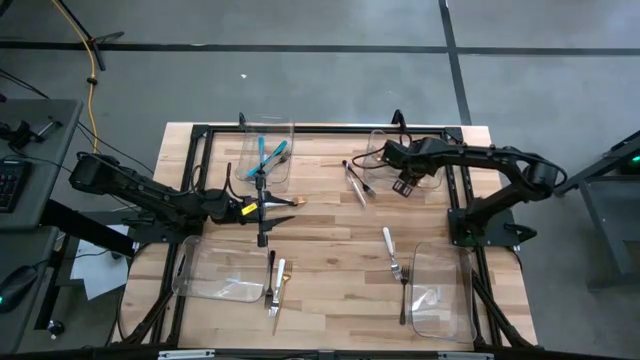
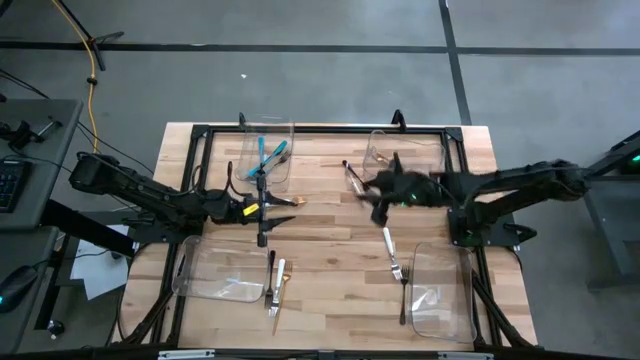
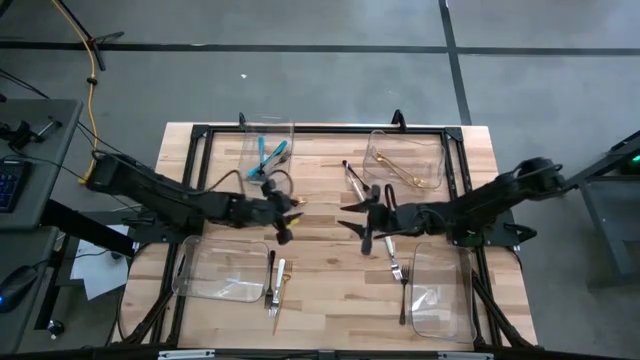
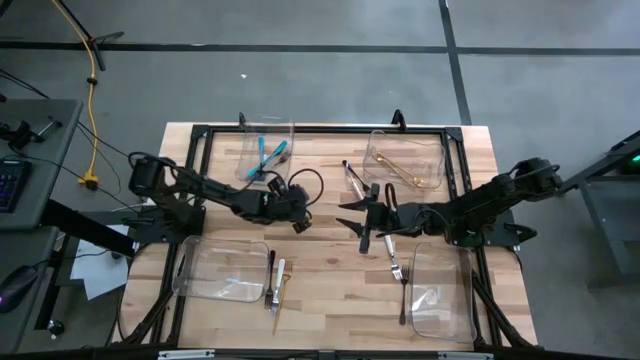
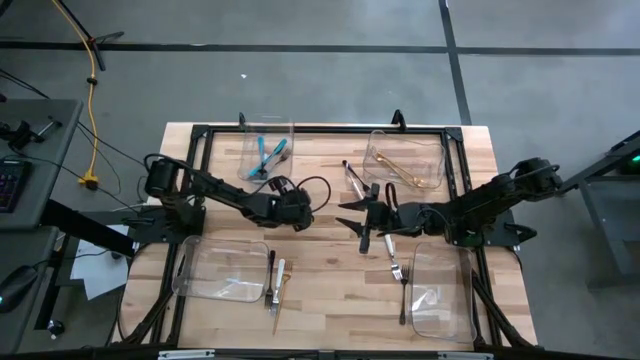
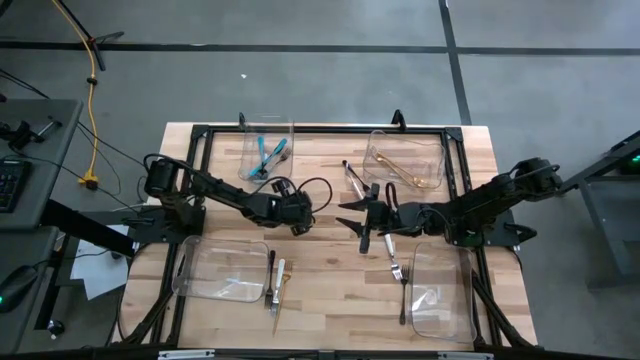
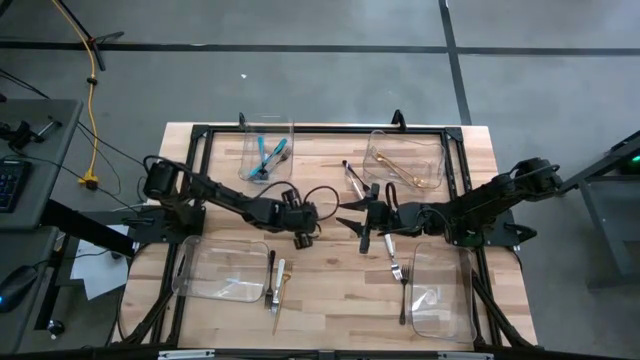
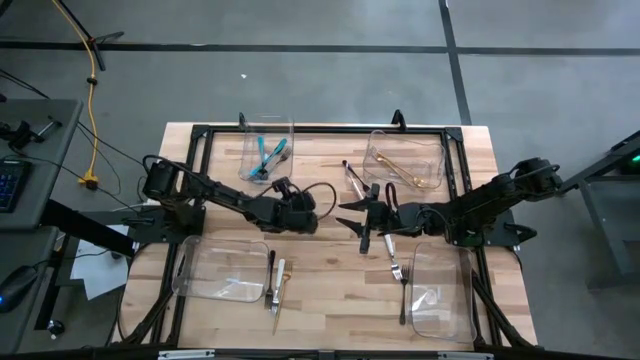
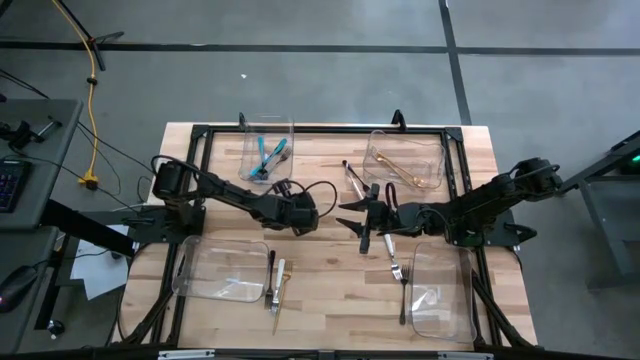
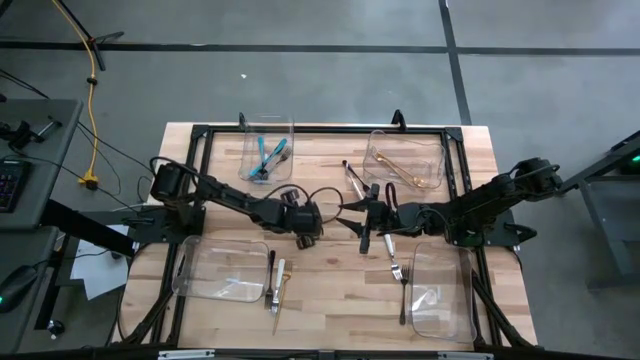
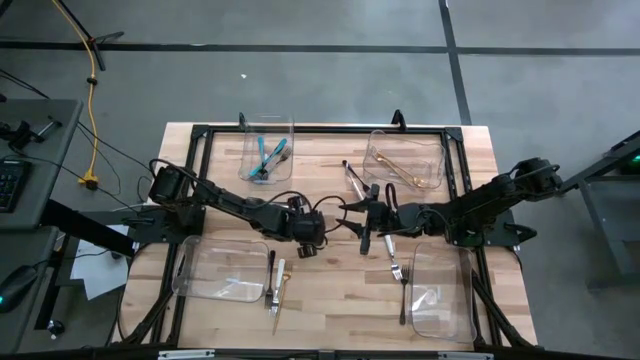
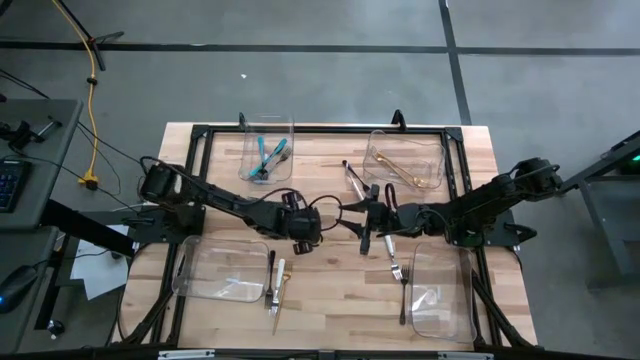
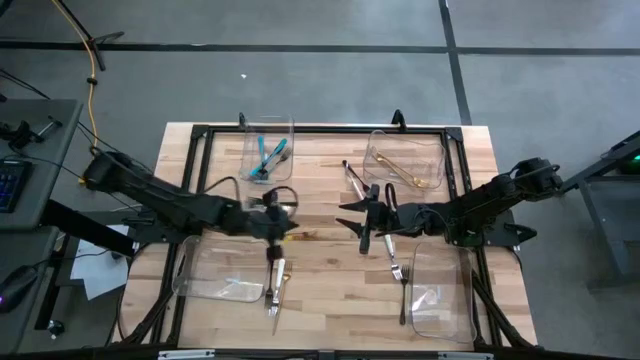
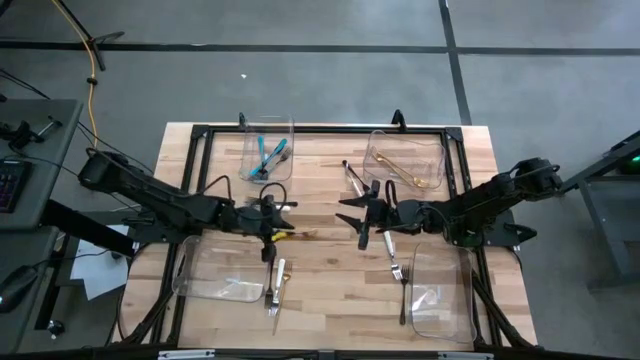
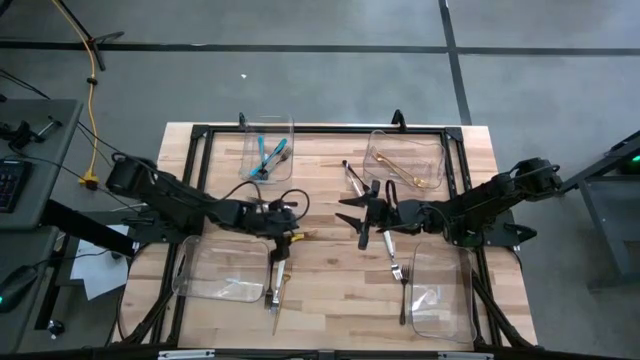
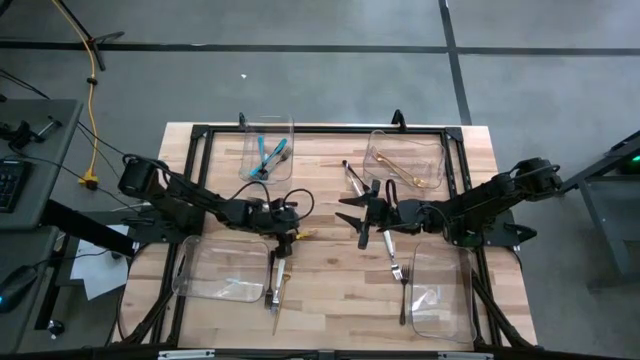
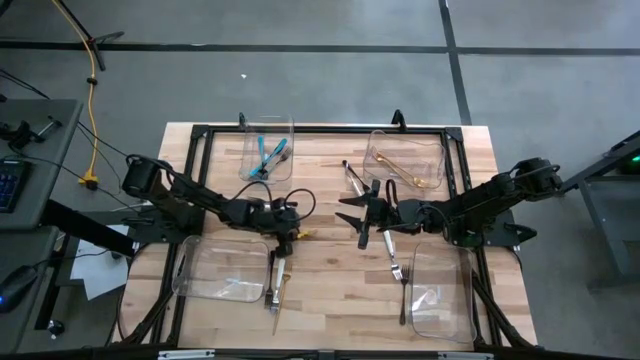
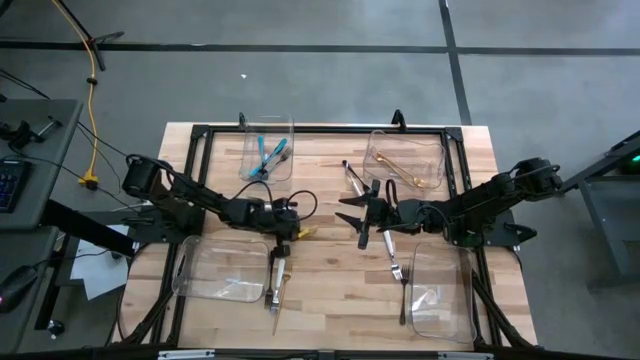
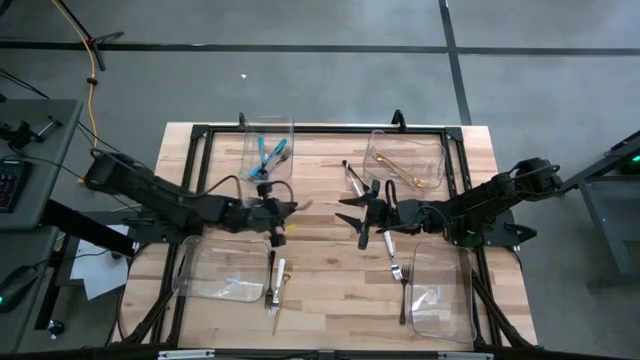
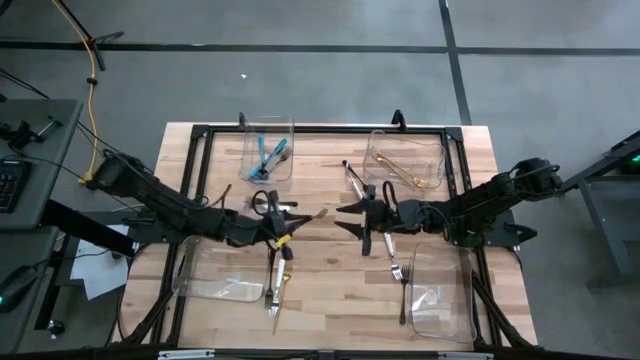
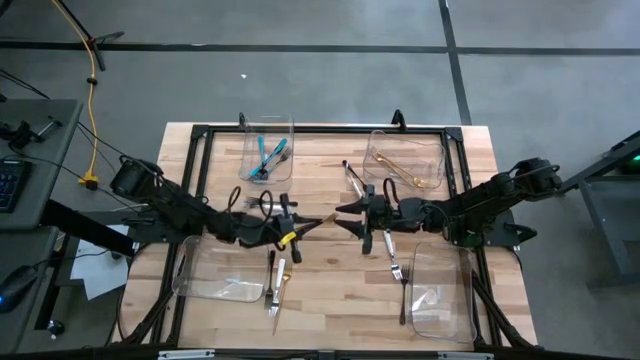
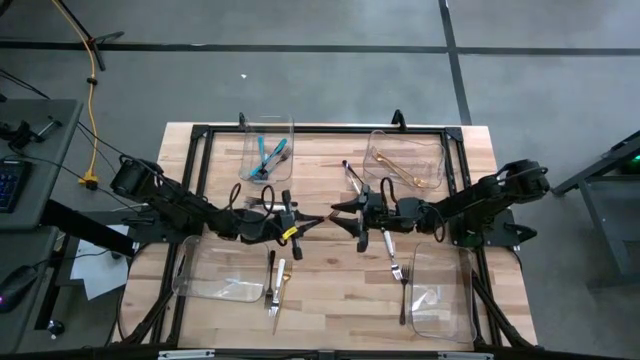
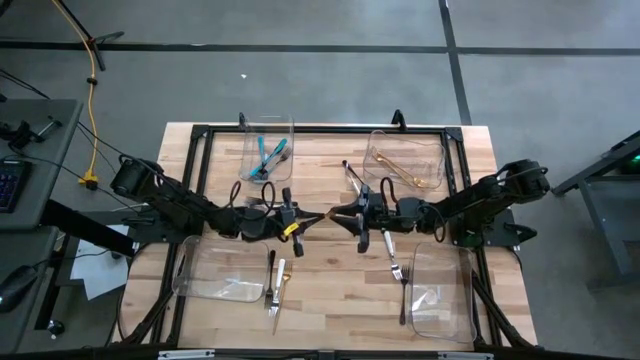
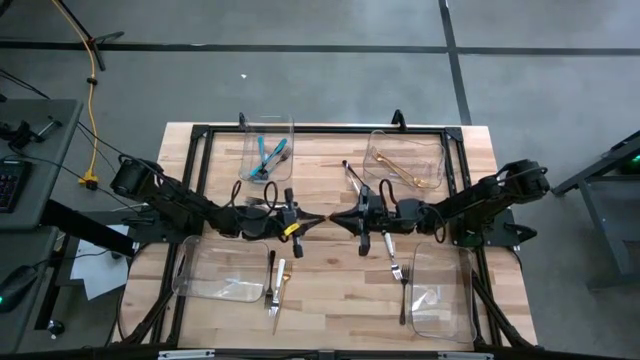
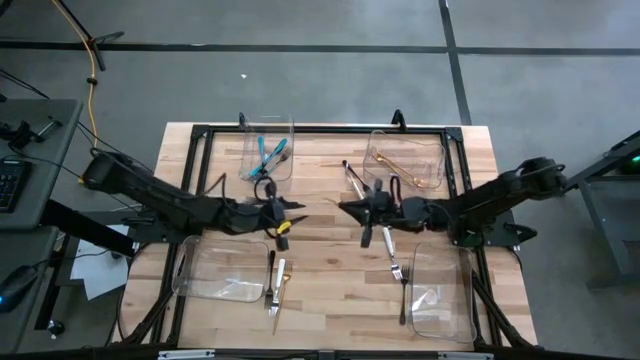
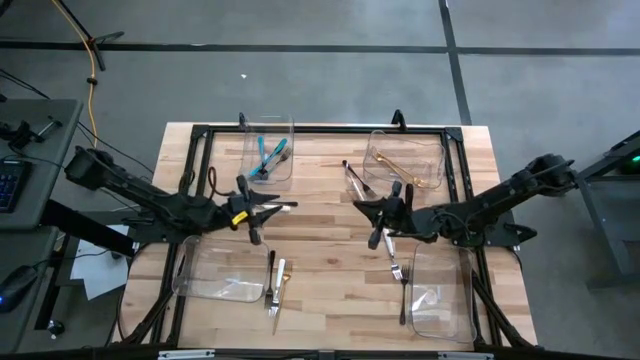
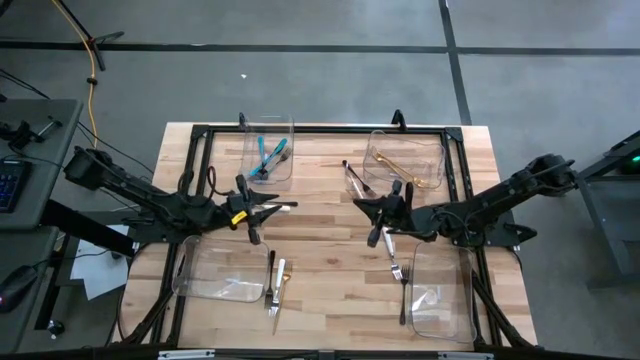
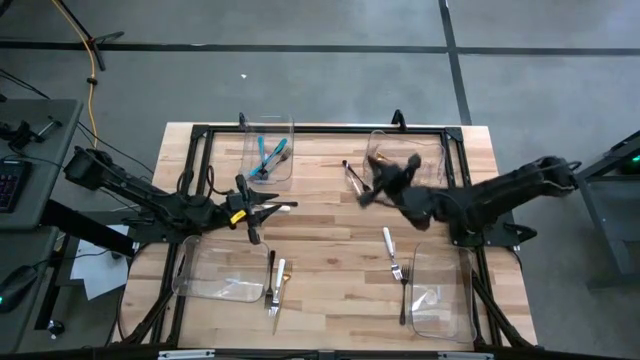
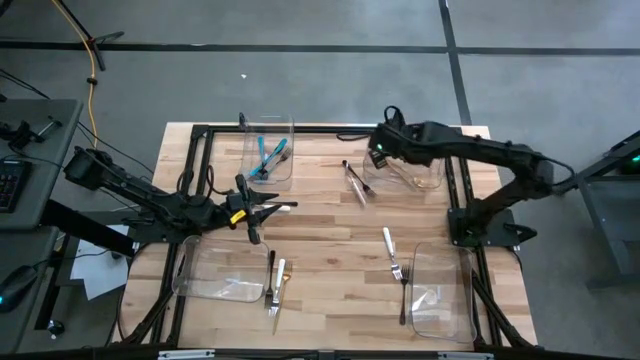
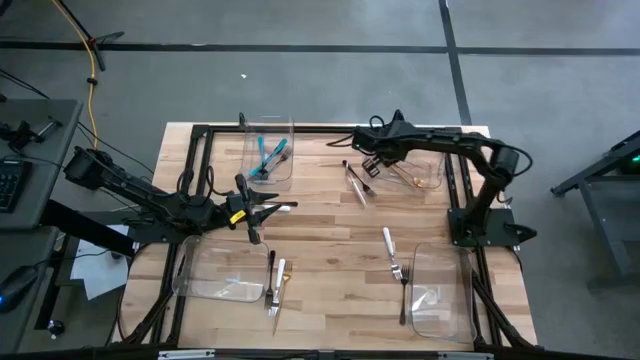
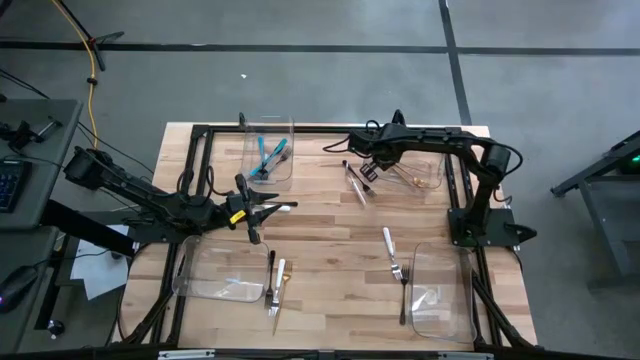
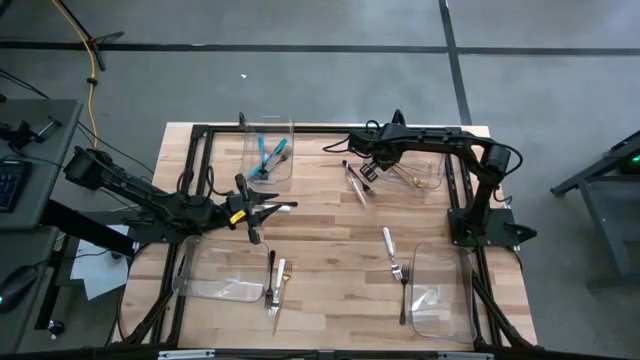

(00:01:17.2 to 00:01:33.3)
Task: Sort silverware by color (type)
Put the gold fork into the top right transparent bin

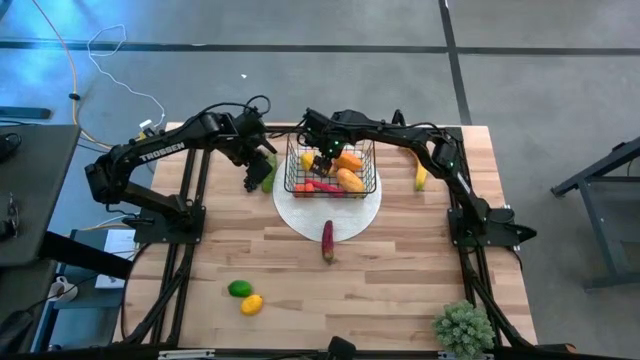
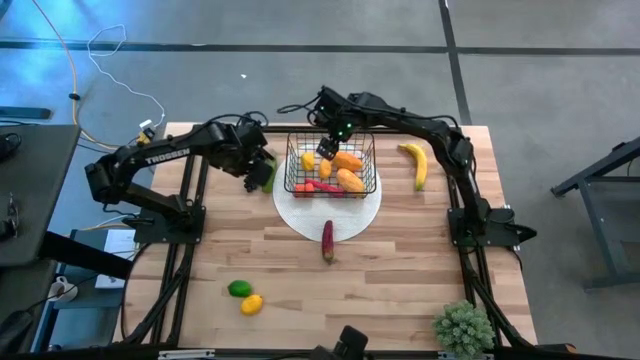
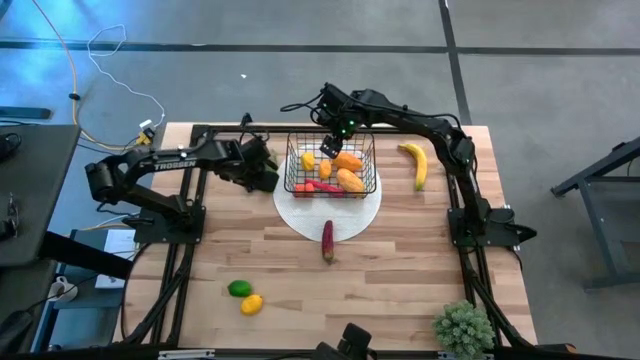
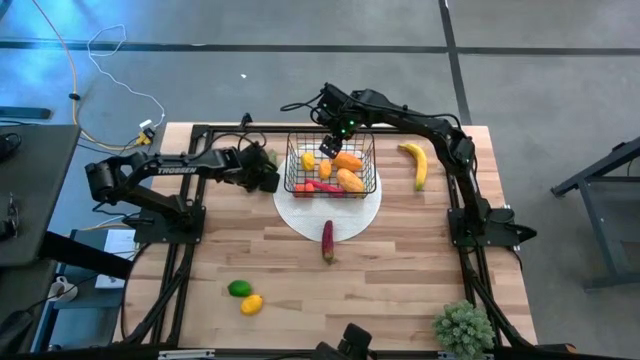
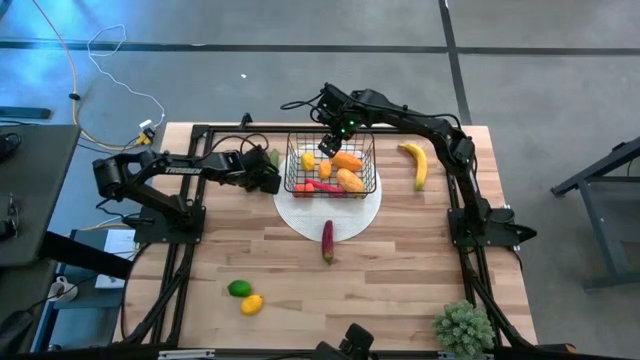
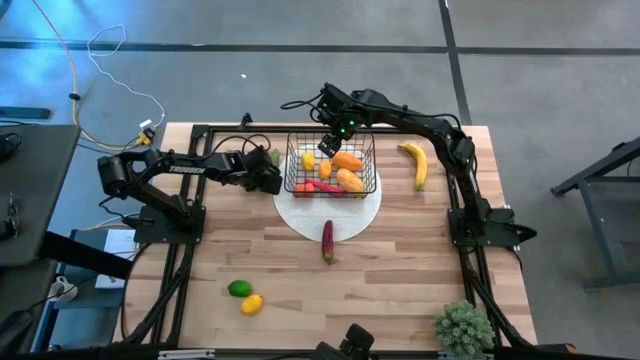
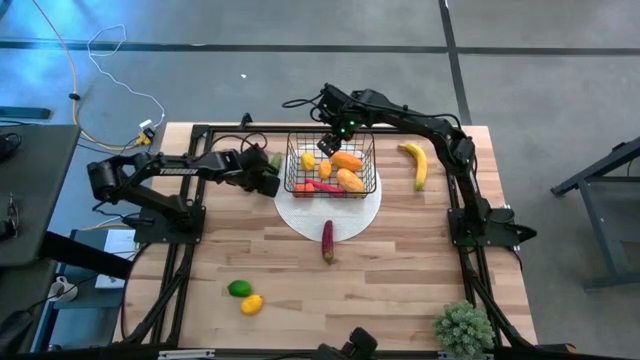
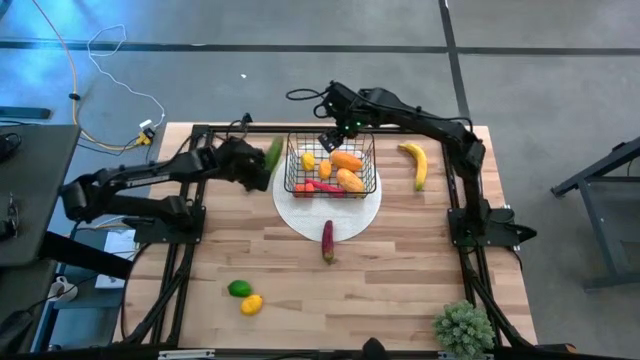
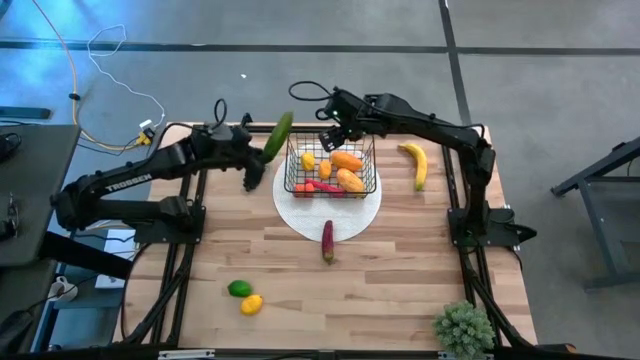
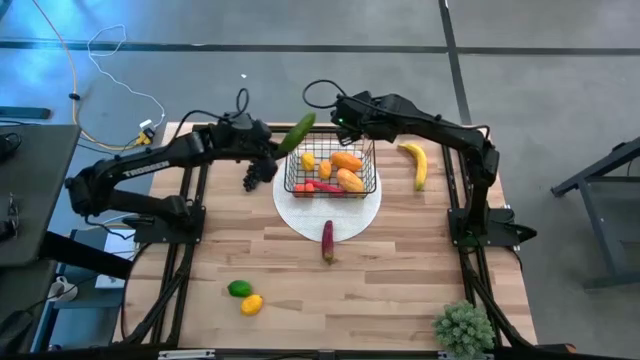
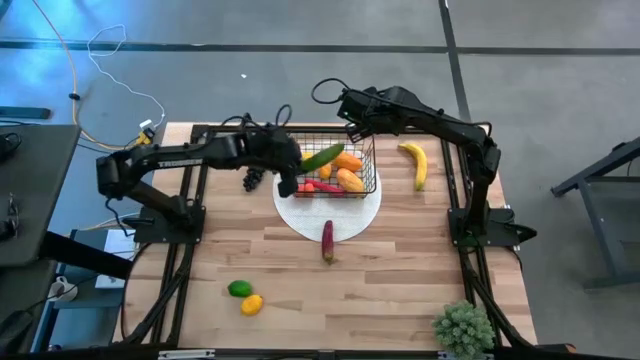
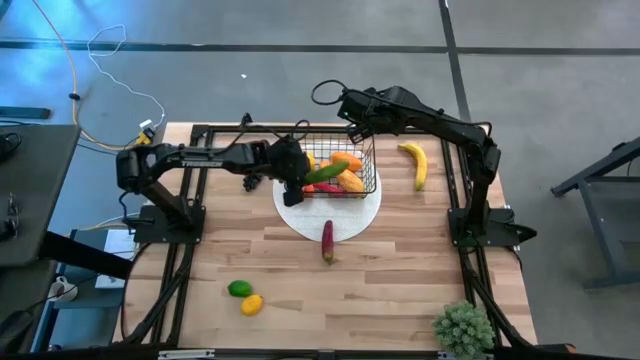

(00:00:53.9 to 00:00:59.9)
Task: Build produce basket
Put the cucumber into the wire basket
